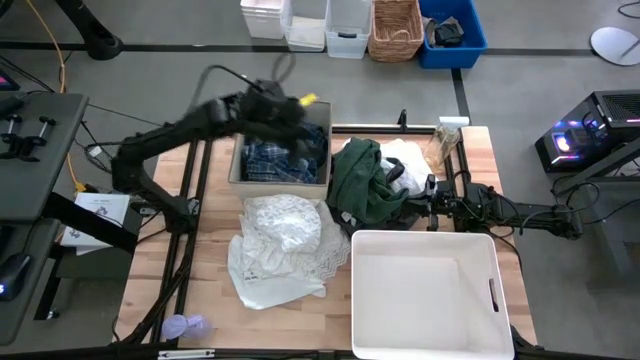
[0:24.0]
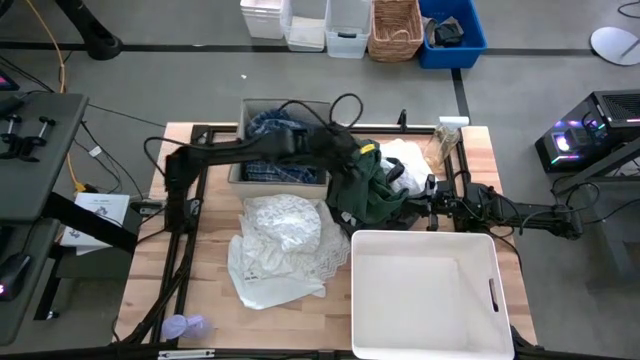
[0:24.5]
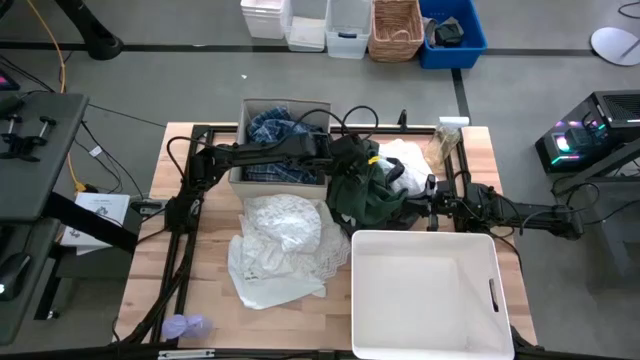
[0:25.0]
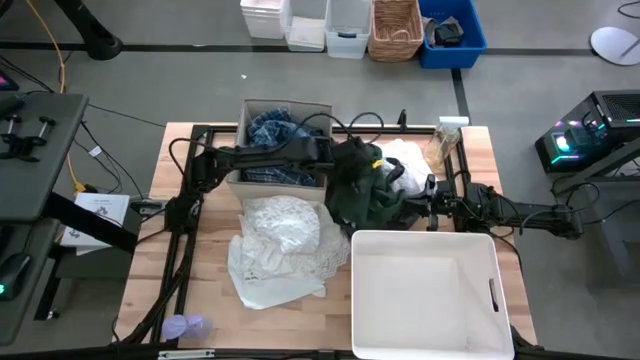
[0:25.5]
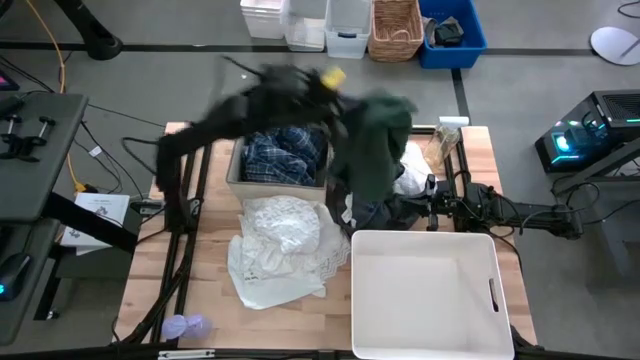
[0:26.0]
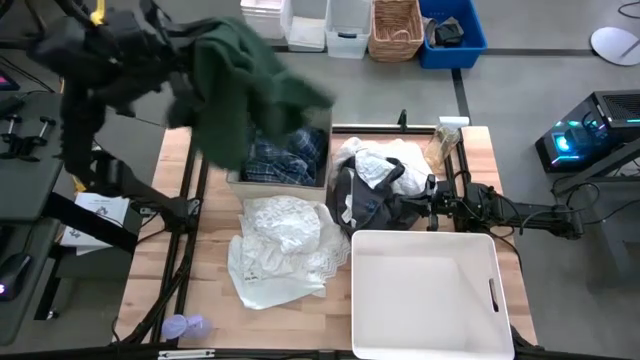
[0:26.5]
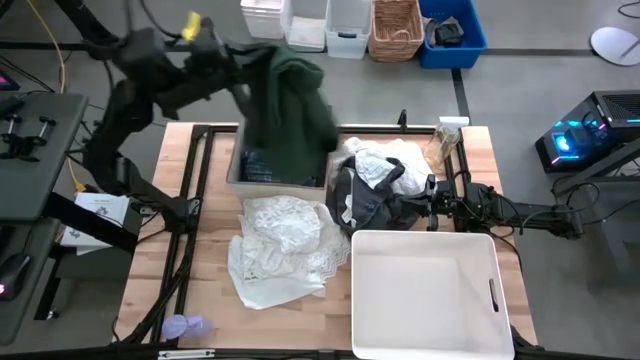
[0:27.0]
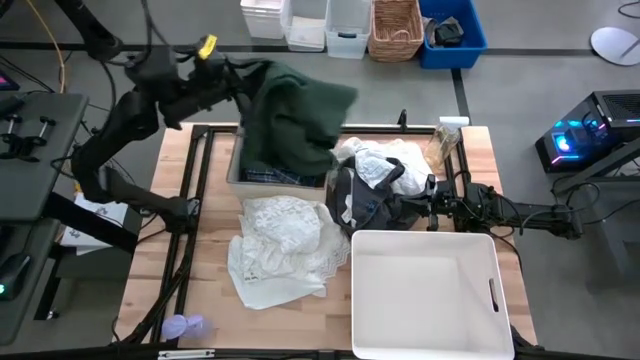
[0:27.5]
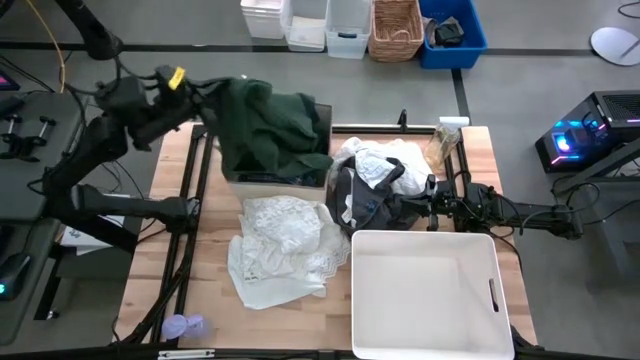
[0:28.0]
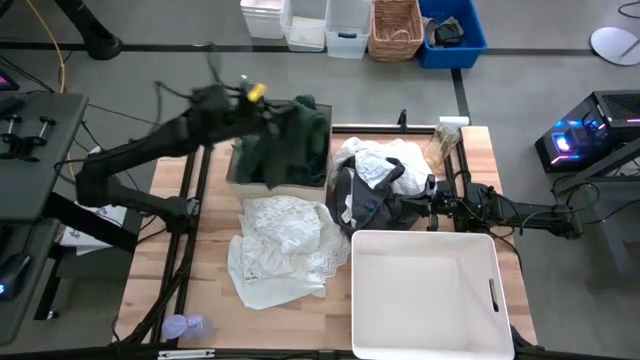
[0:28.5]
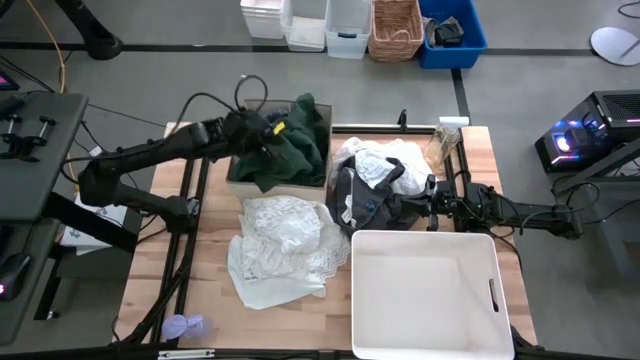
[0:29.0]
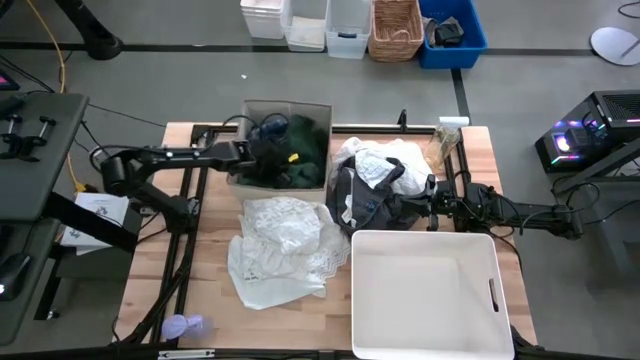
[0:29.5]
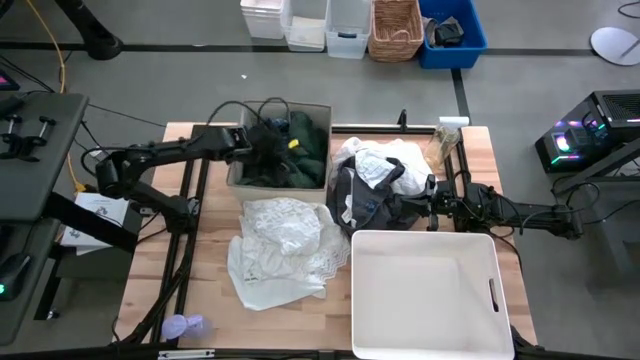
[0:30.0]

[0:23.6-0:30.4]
Task: Sort clothes
Put the dark green shorts into the laundry organizer

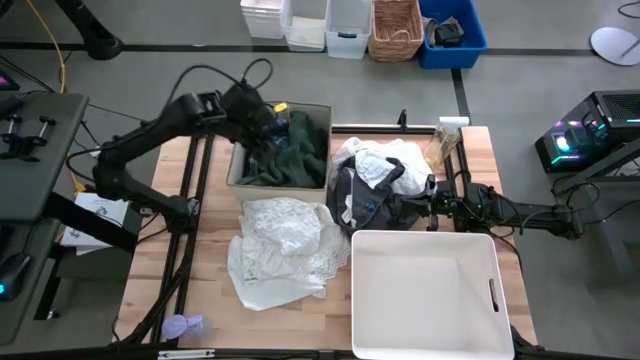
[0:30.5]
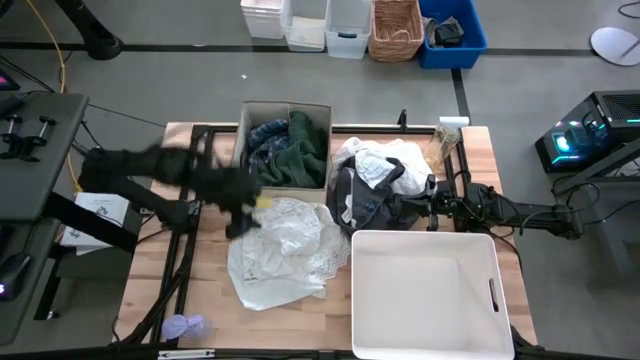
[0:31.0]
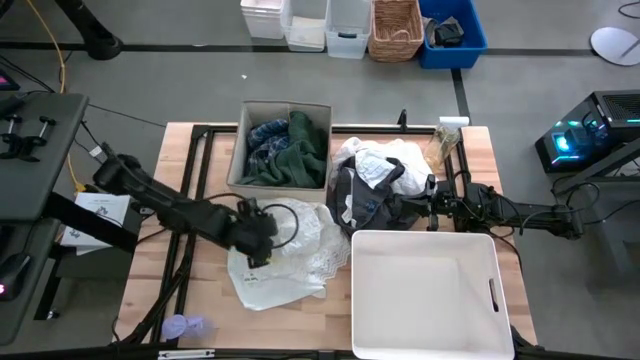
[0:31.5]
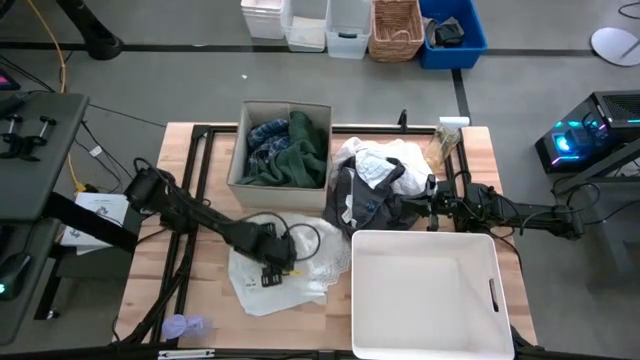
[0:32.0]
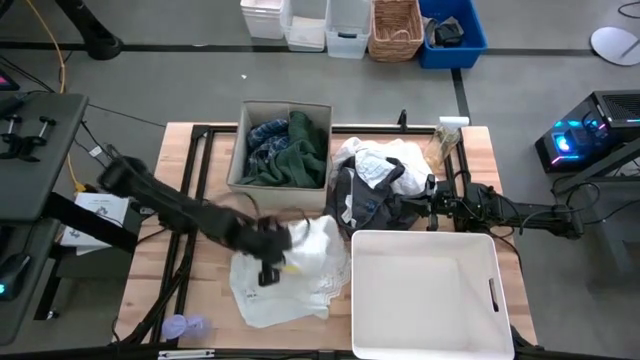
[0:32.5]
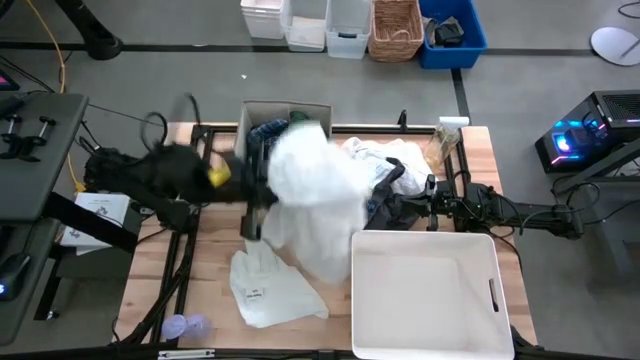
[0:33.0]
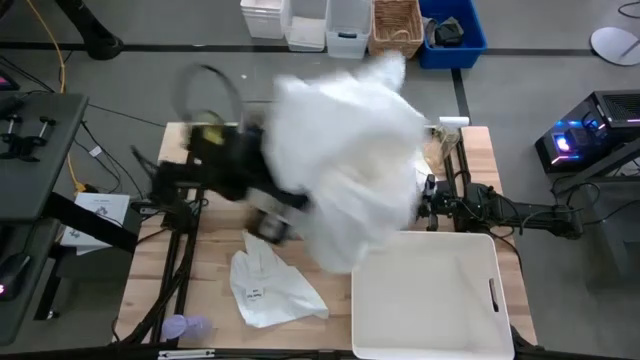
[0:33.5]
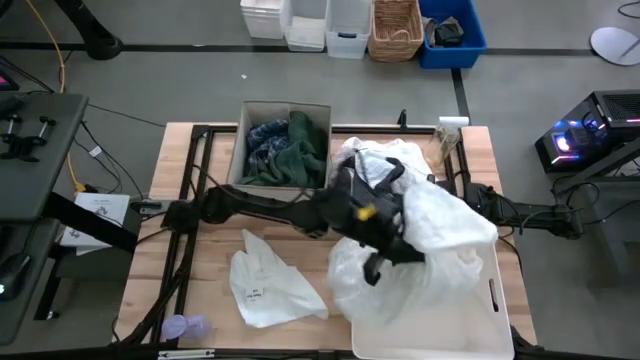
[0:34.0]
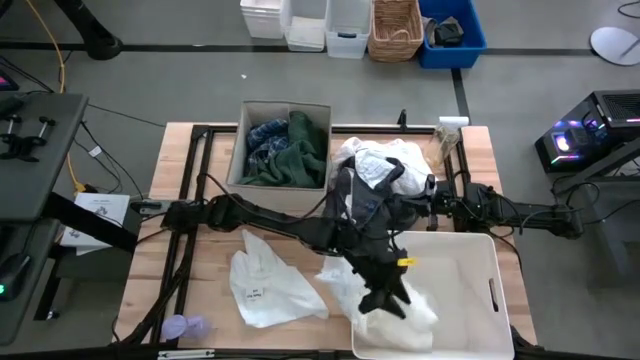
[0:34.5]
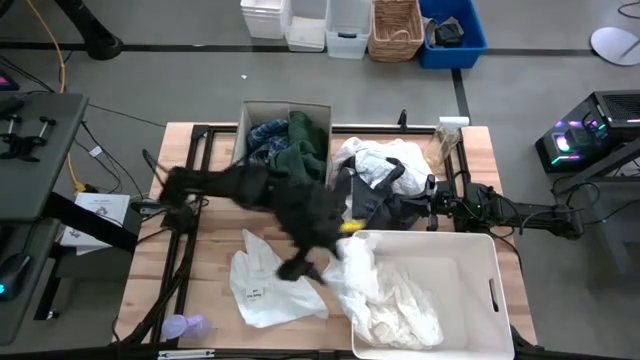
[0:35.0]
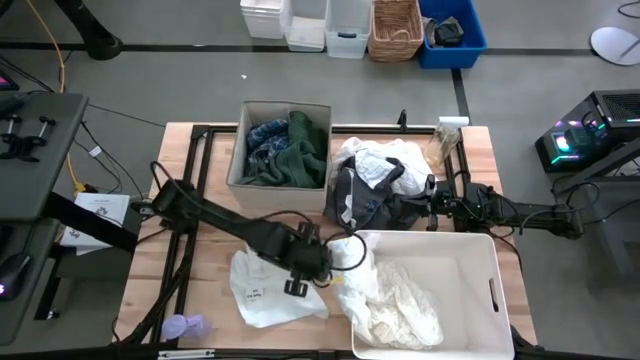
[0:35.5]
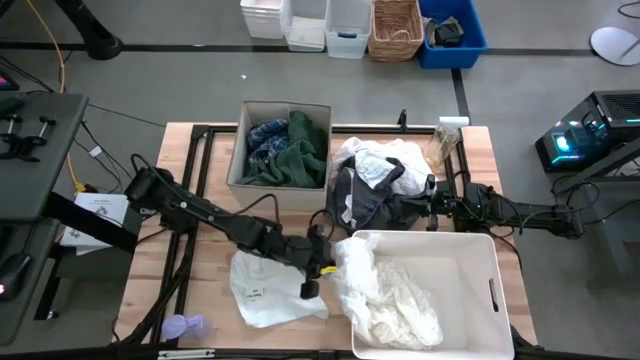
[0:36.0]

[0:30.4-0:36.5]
Put the white blouse into the laundry bin

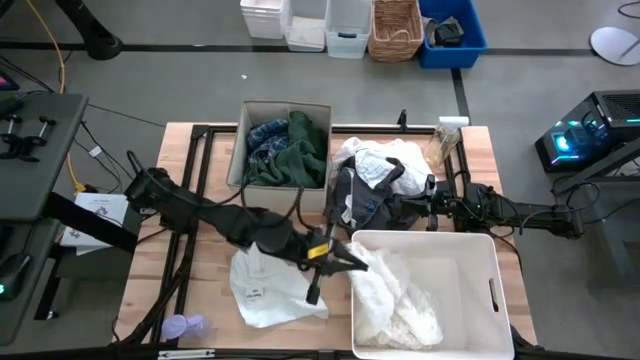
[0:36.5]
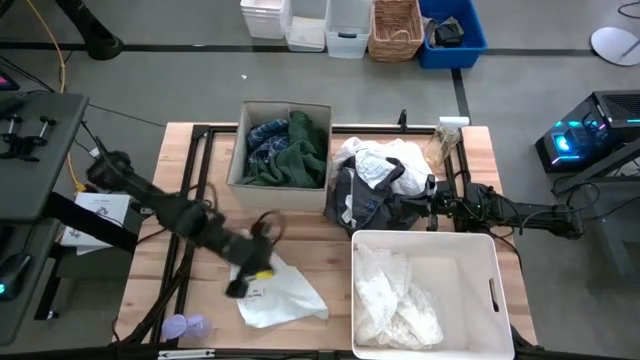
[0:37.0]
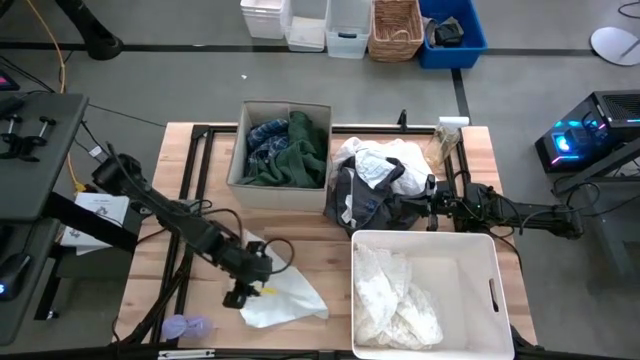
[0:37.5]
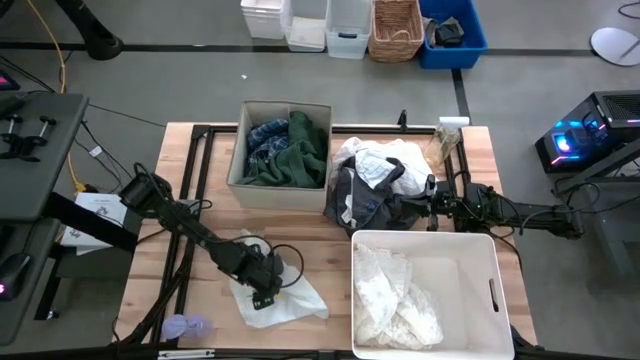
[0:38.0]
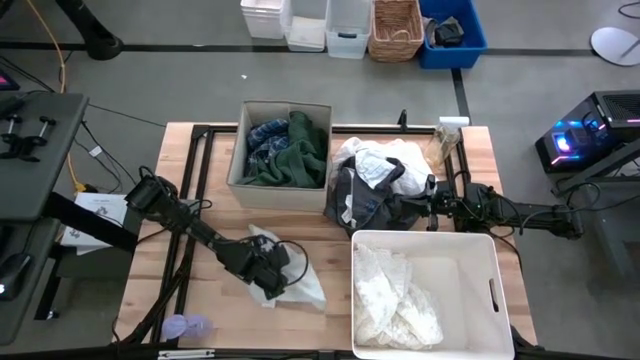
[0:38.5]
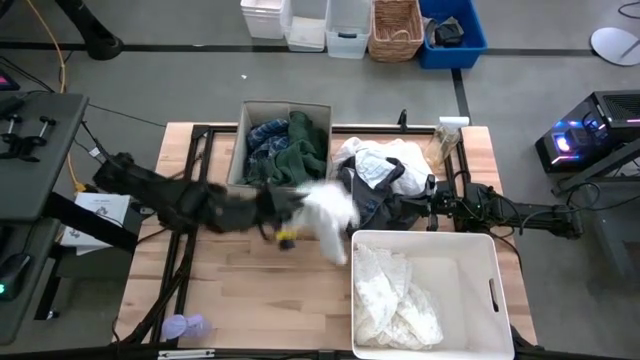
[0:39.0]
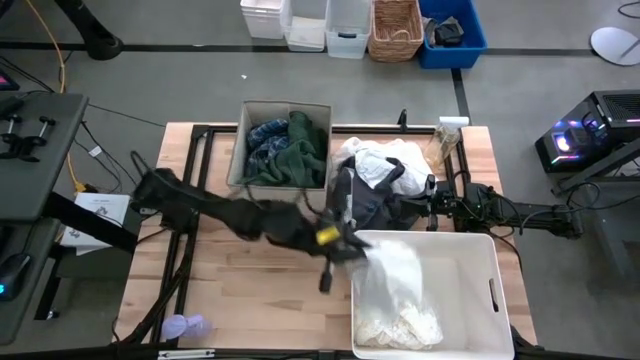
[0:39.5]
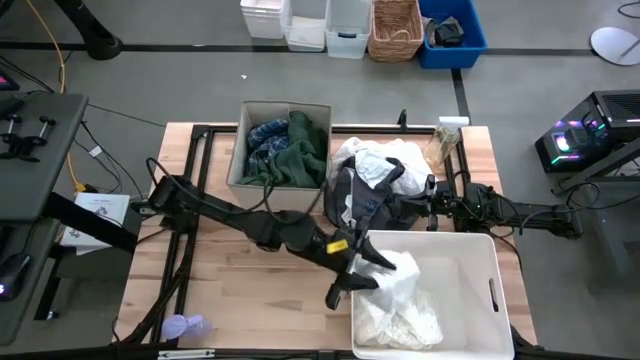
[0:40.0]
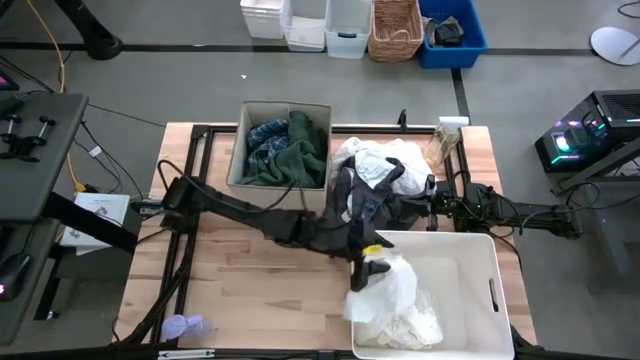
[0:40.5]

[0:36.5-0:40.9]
Put the white towel into the laundry bin

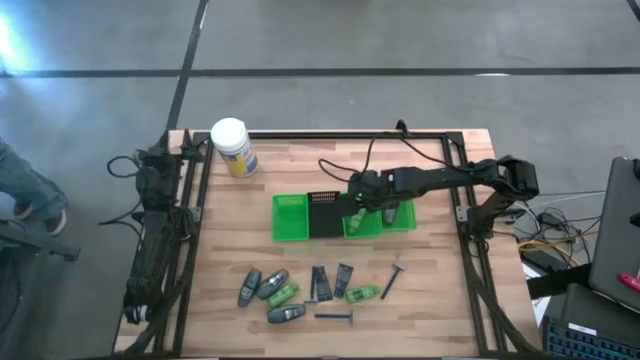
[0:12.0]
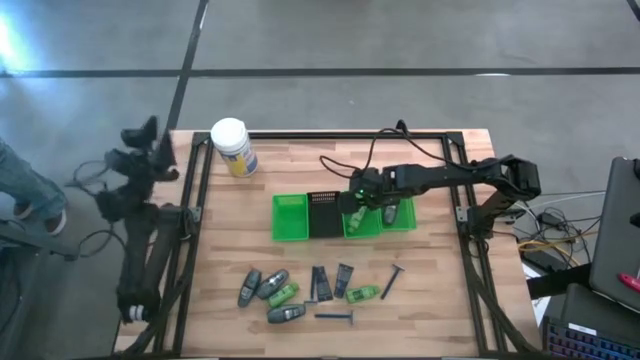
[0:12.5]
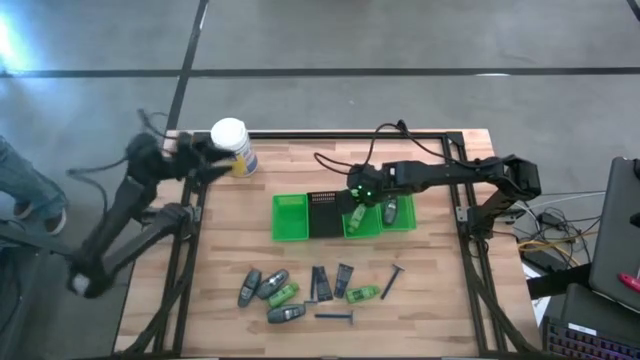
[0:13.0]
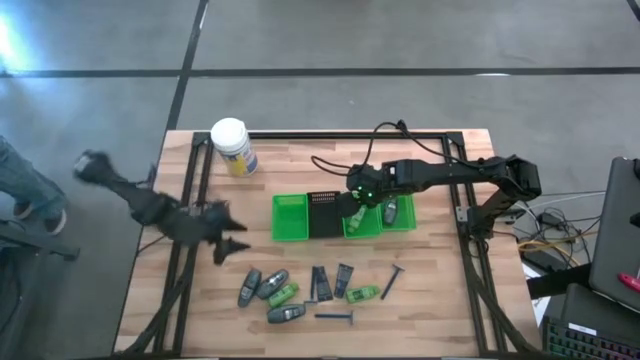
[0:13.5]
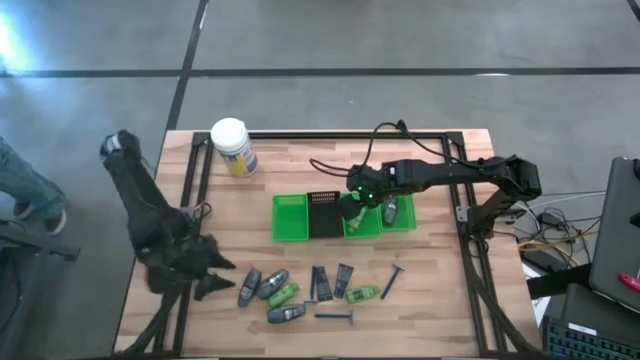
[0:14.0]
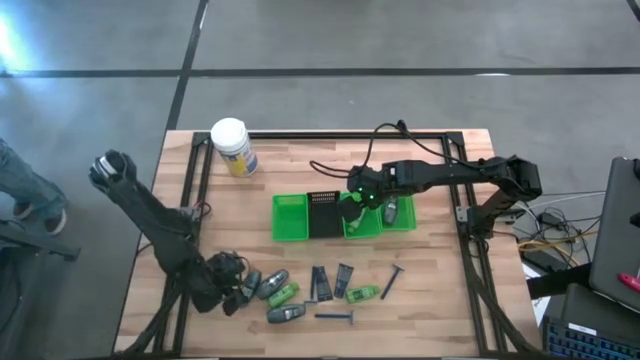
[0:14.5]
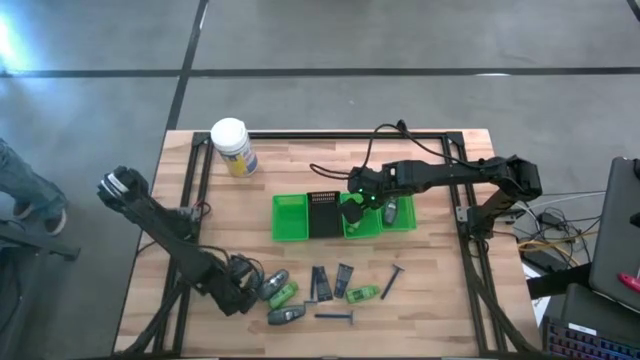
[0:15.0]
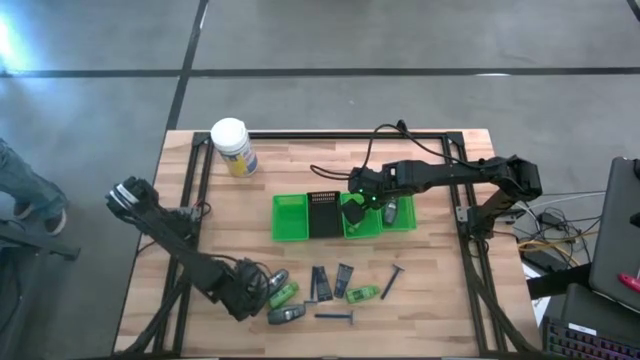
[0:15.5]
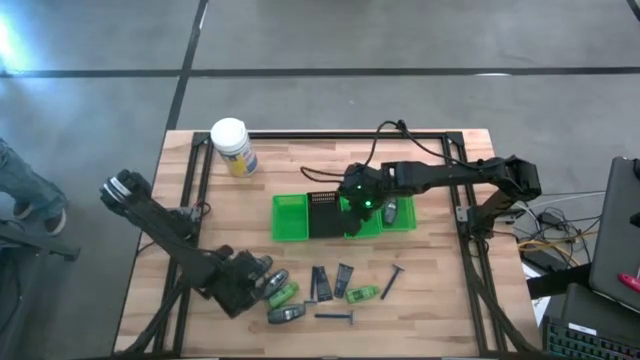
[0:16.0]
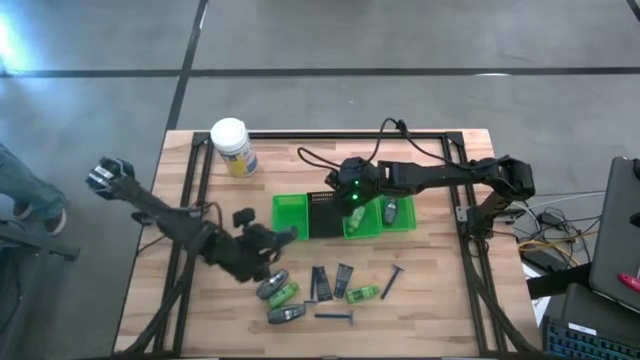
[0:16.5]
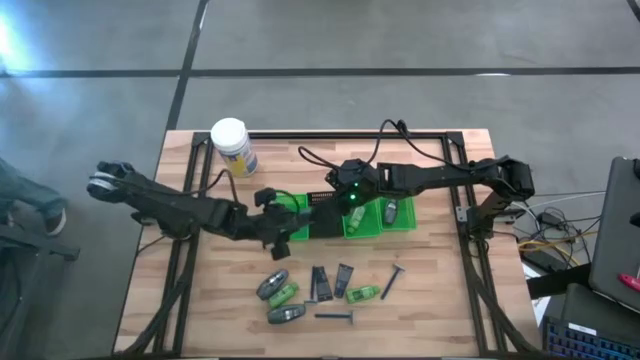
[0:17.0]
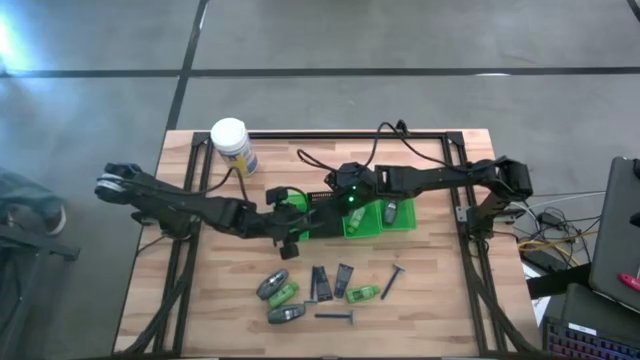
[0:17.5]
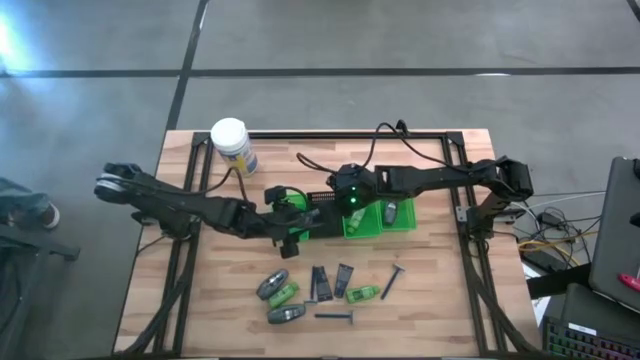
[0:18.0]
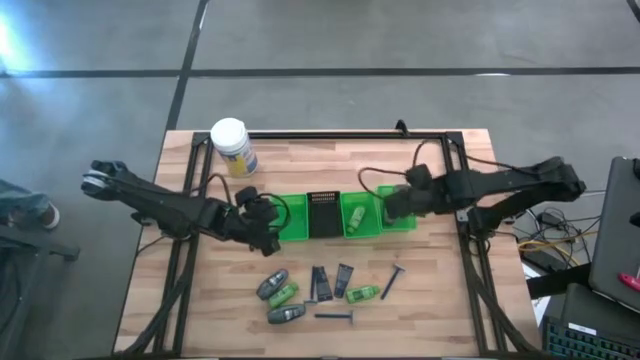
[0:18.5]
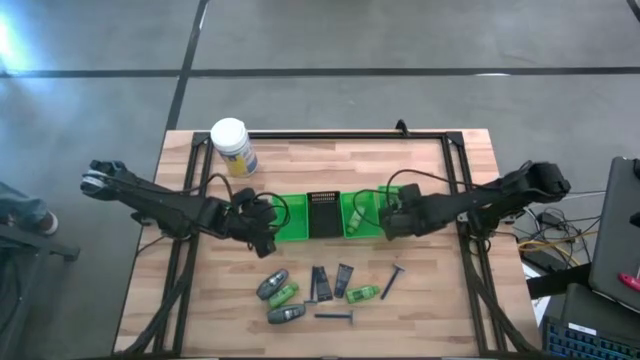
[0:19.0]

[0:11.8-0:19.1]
Task: Pick & Place Travel size toiletries
Put the black deodorant into the right green basket
